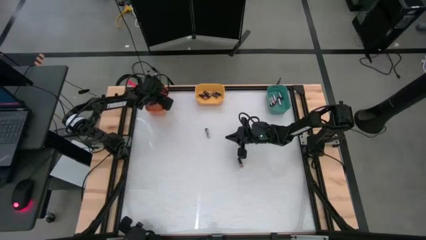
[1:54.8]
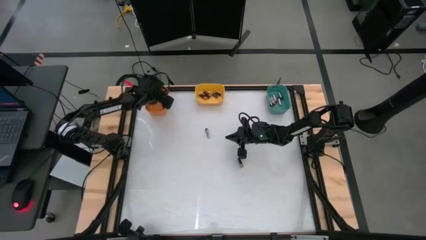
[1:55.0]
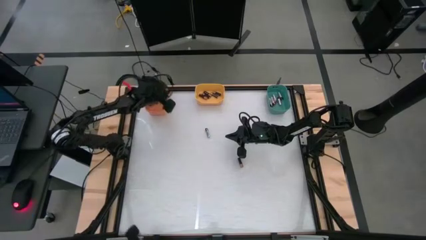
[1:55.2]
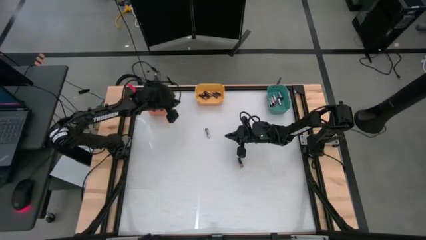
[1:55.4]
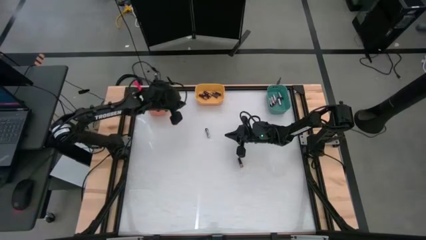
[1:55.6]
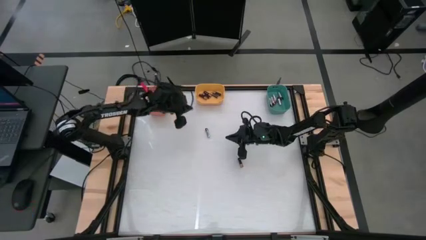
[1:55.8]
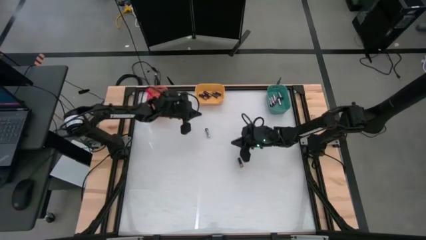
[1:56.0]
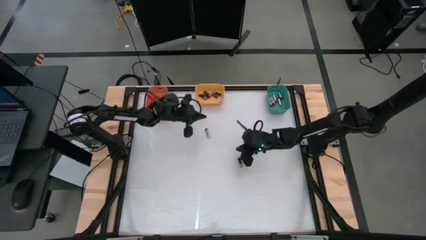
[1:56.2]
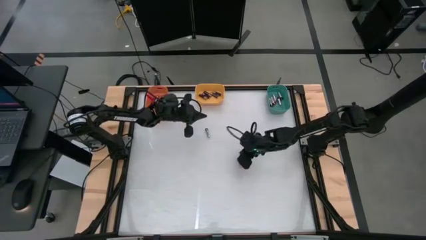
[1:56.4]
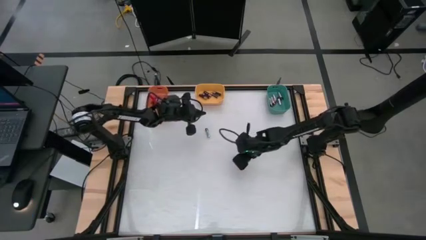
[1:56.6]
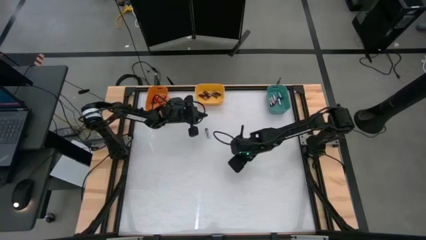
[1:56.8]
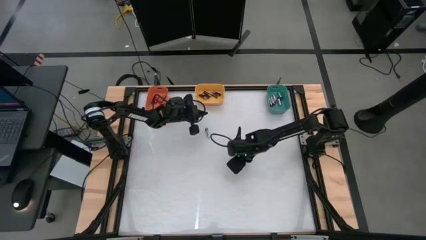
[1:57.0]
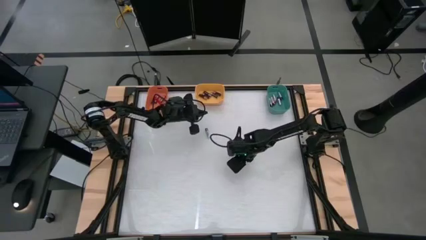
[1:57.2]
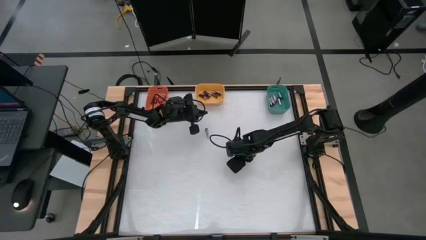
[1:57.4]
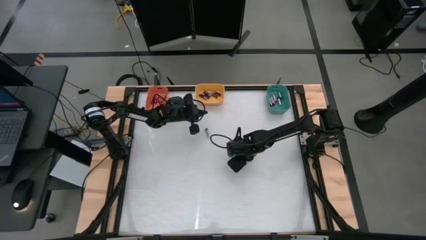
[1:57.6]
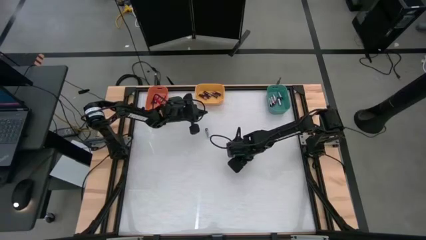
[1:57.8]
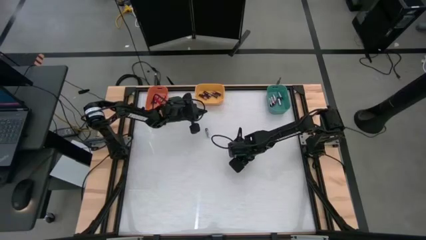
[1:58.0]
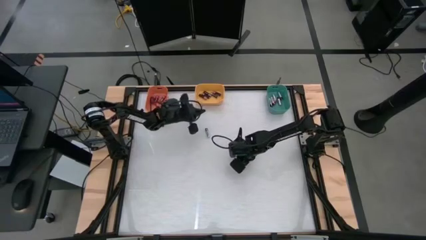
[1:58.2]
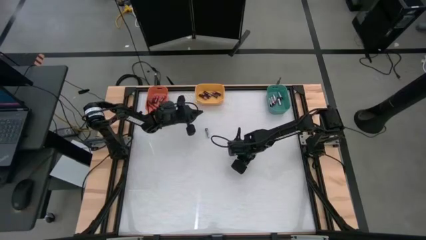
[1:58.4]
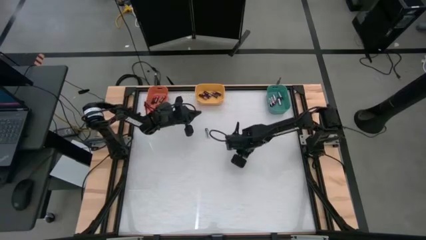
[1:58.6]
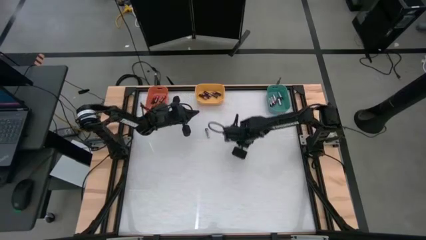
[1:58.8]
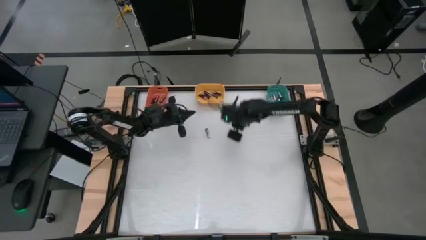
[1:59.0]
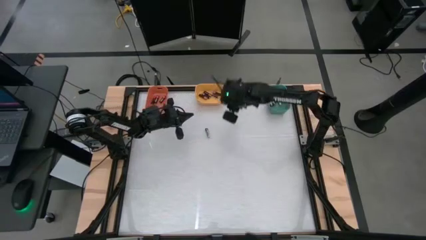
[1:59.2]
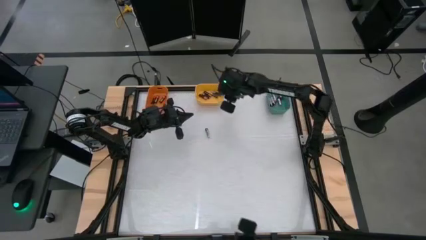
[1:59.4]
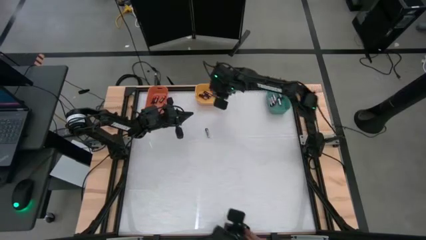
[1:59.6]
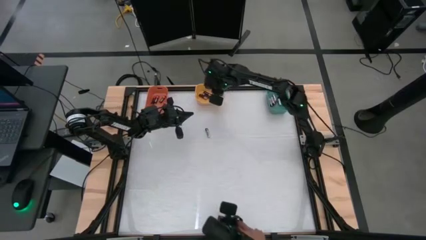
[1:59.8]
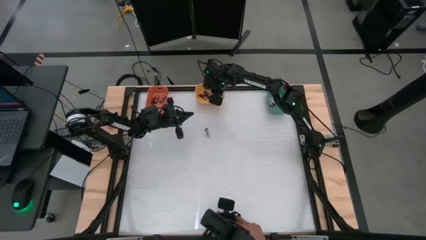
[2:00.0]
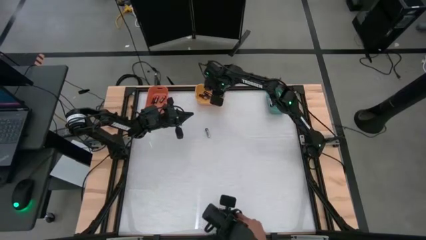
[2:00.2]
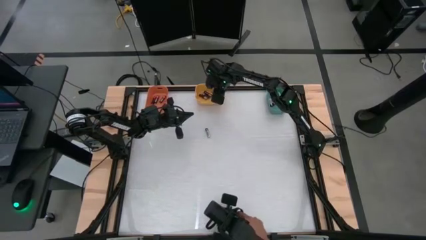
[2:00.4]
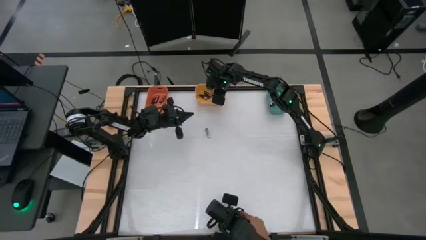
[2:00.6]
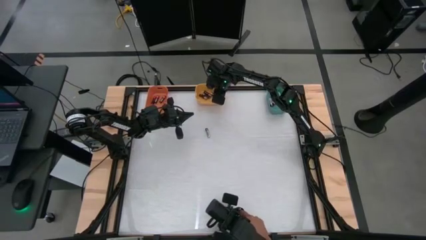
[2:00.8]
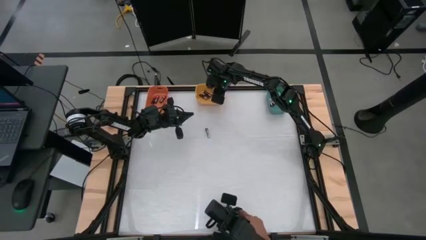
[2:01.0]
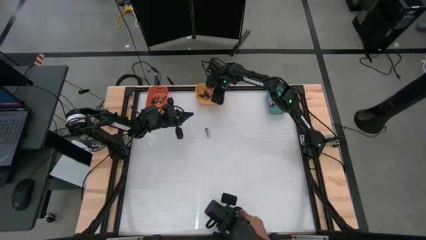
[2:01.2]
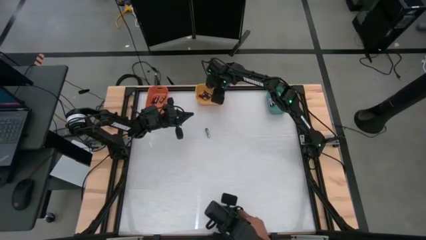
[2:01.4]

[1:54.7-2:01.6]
Task: Sort batteries
Put the gold battery into the yellow bin

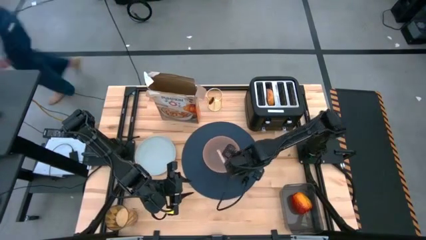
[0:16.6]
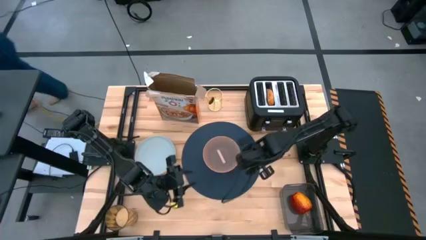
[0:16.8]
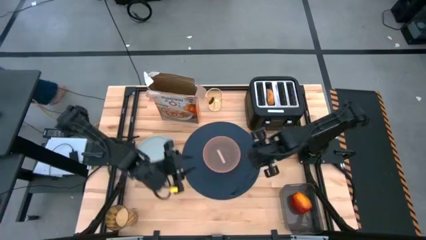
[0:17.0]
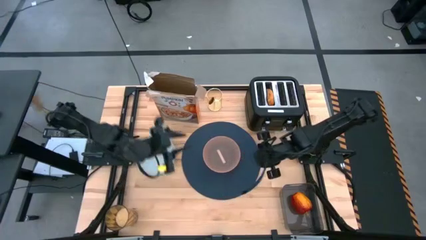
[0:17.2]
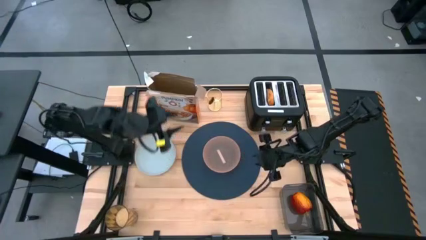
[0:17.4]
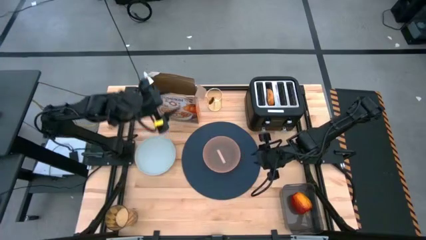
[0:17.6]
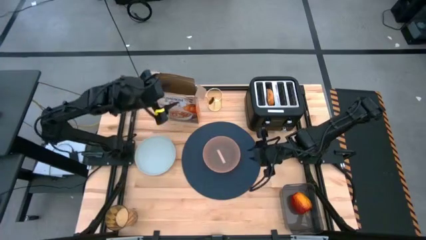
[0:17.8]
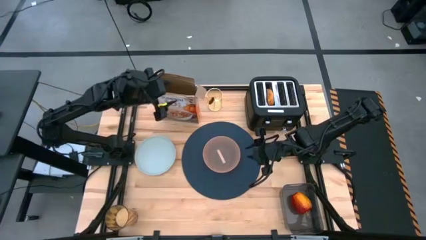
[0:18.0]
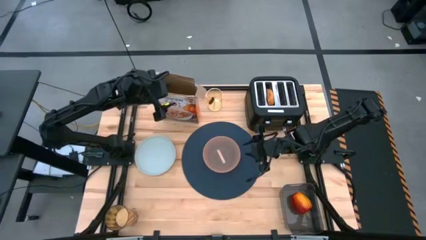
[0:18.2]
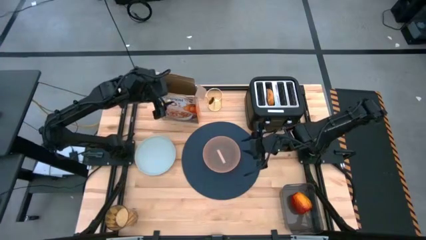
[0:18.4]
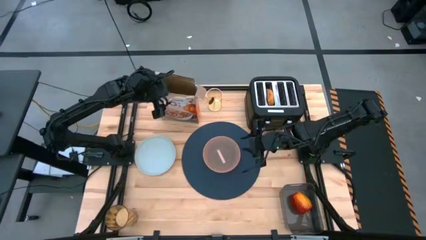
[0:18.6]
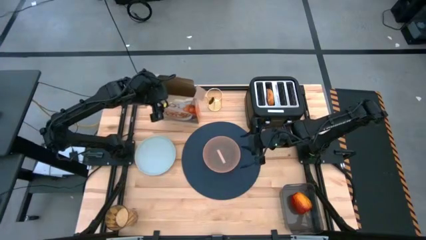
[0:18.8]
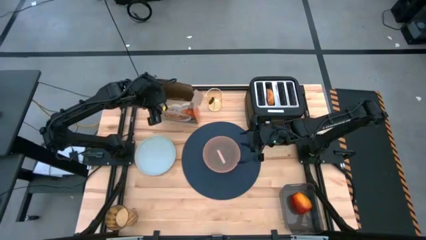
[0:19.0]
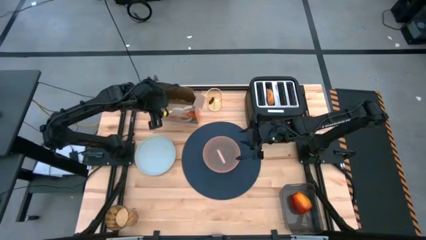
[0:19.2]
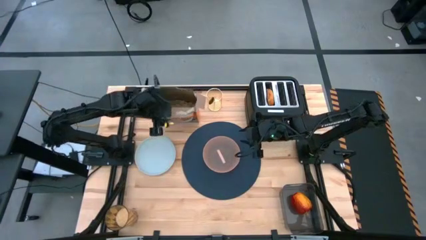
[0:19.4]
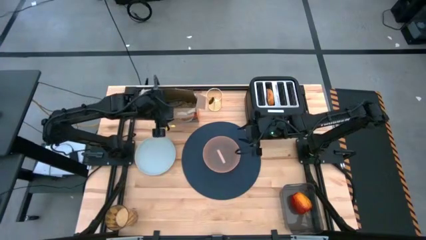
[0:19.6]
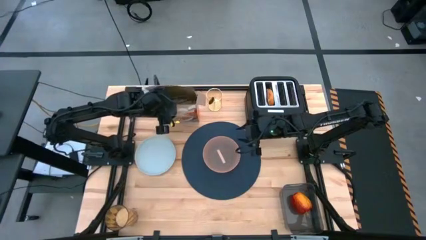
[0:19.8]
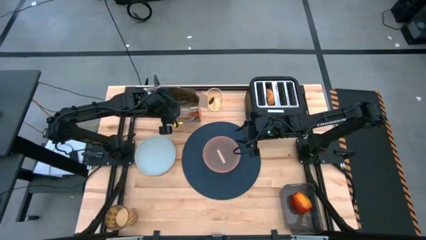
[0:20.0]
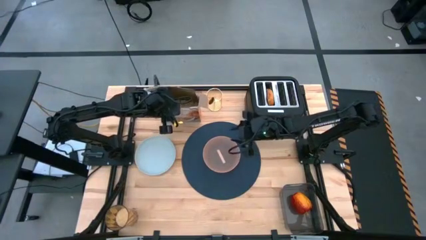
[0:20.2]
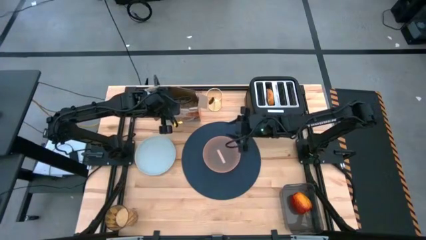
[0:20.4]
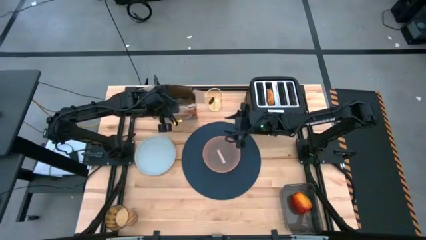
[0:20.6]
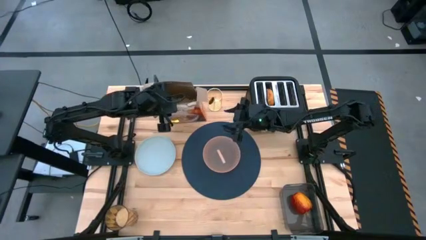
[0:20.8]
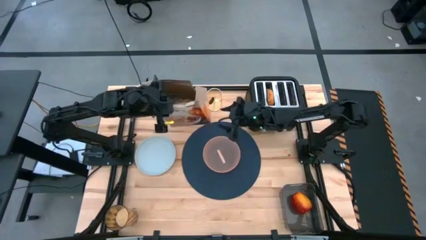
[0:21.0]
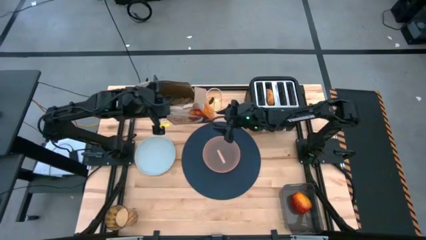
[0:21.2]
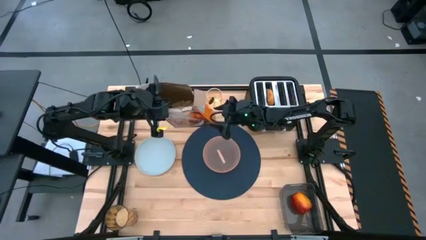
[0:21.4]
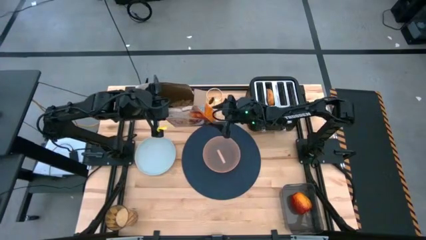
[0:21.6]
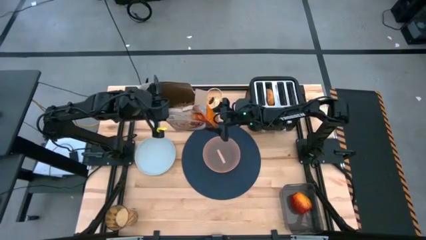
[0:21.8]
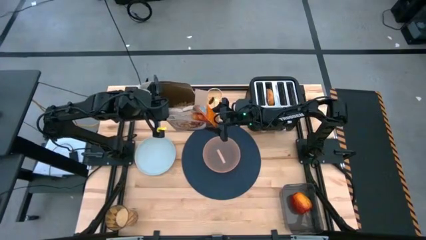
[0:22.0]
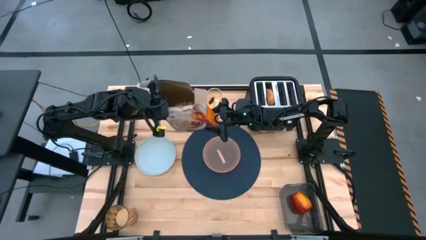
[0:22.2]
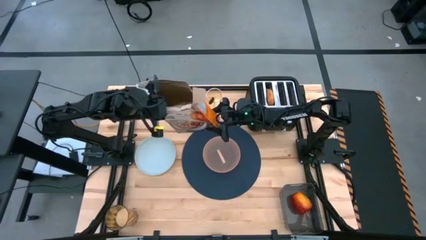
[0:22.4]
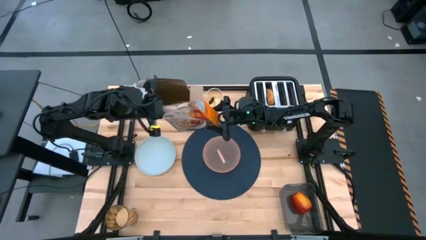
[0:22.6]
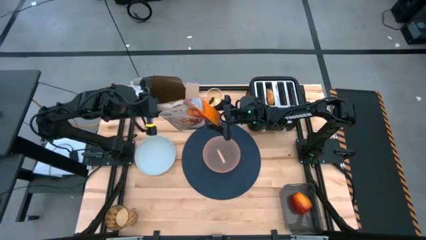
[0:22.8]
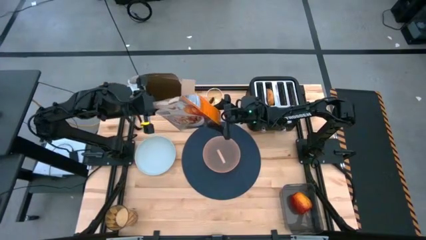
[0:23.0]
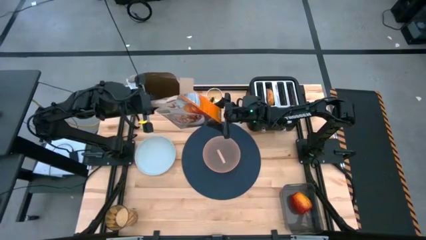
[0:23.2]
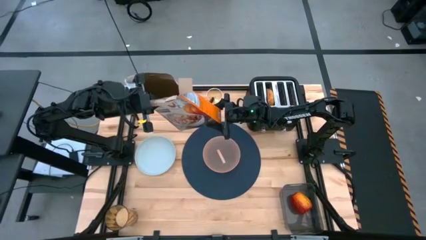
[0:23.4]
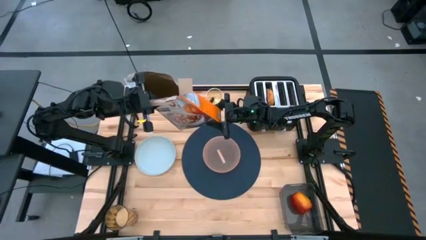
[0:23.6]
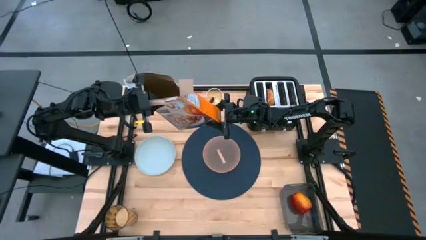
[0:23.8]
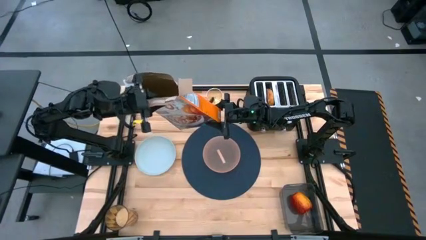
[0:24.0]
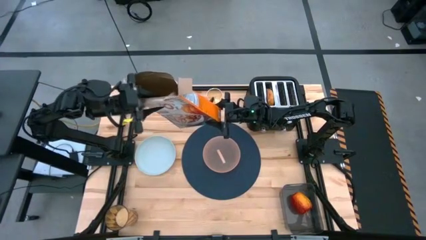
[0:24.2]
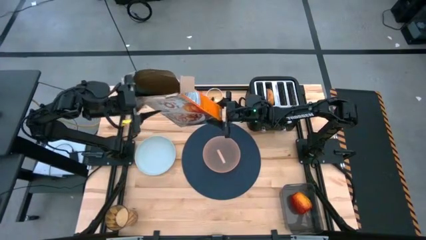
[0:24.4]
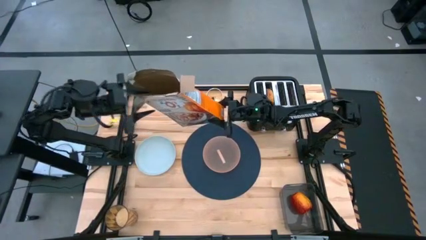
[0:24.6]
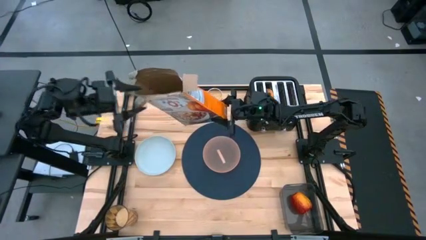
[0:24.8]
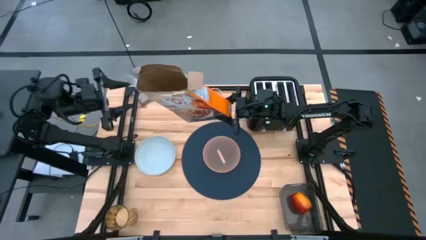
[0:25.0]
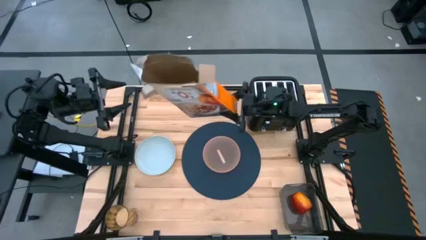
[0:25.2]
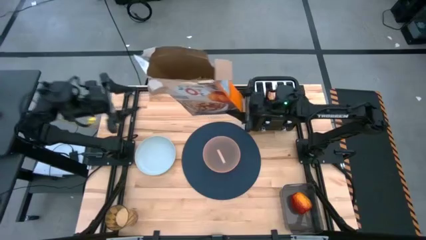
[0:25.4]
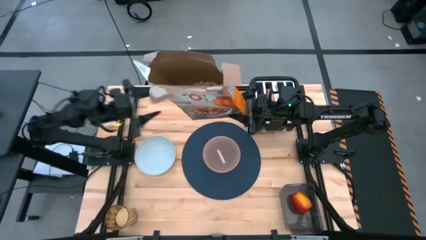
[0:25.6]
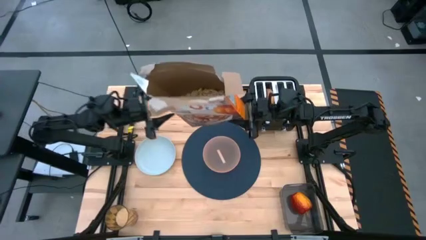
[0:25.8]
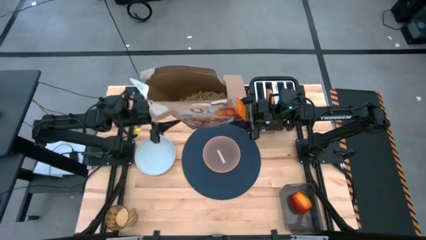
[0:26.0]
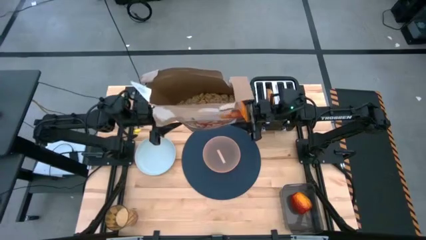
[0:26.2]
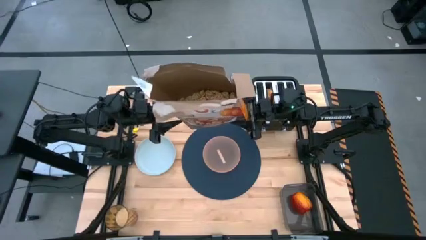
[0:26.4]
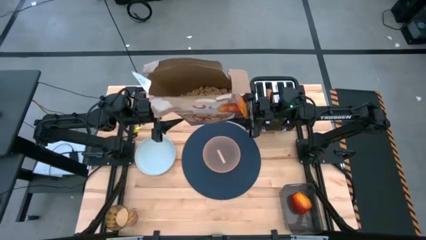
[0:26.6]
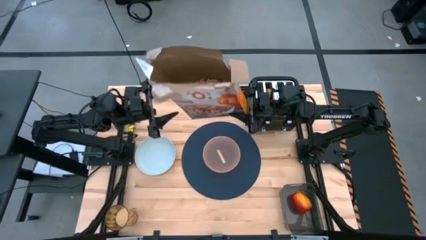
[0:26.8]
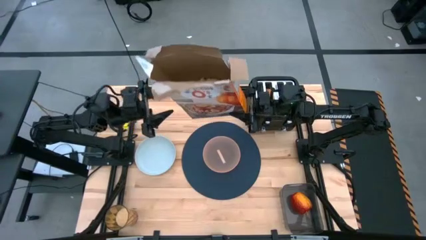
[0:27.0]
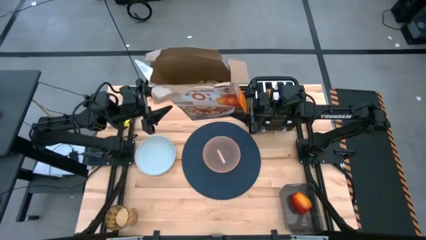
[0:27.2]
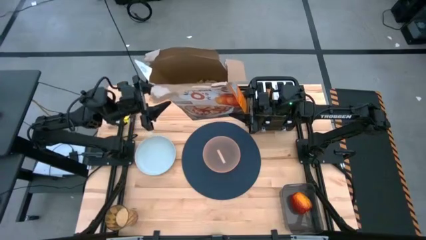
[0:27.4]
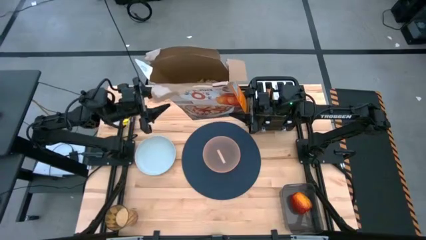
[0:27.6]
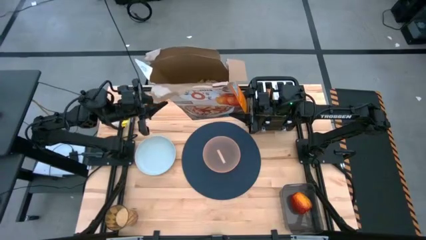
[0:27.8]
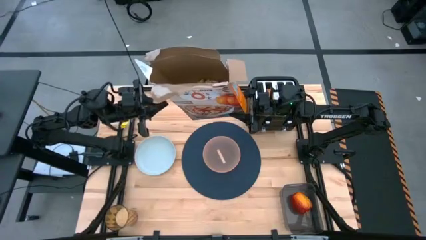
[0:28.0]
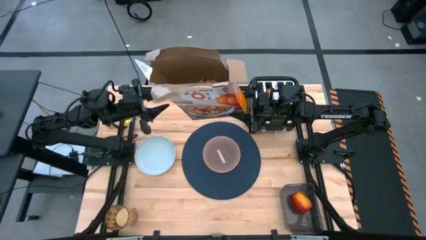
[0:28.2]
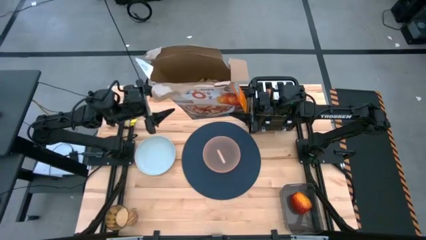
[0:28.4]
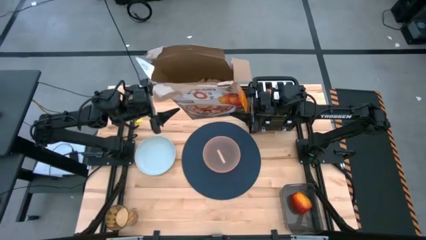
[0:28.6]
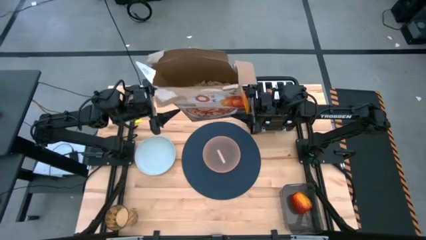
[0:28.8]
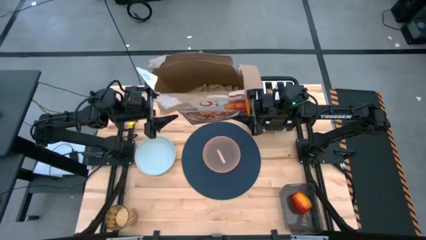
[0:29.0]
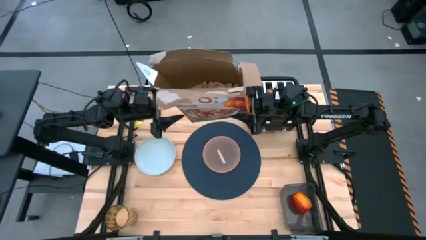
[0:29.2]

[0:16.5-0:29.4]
Task: Arrange a breakfast setting
Pour the cereal into the orange bowl
